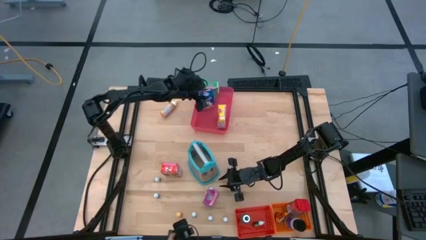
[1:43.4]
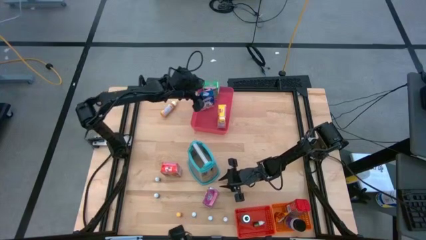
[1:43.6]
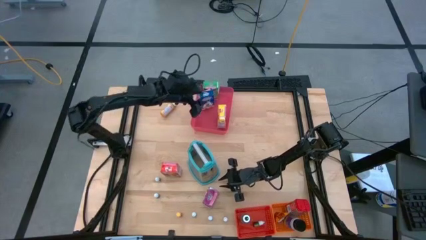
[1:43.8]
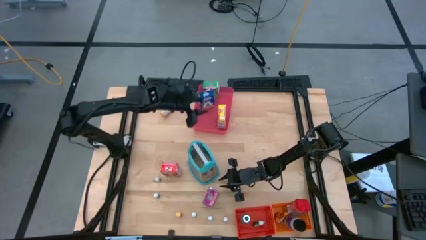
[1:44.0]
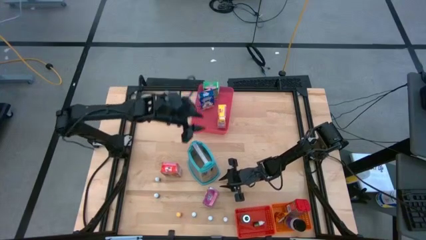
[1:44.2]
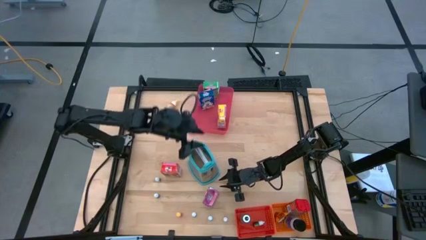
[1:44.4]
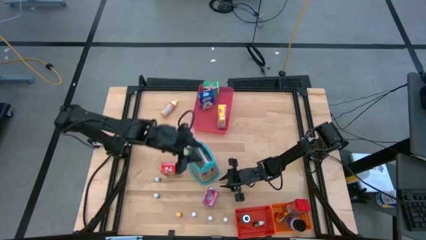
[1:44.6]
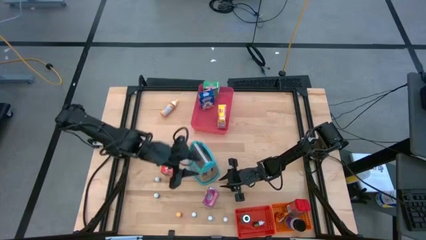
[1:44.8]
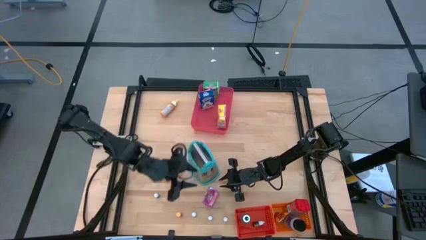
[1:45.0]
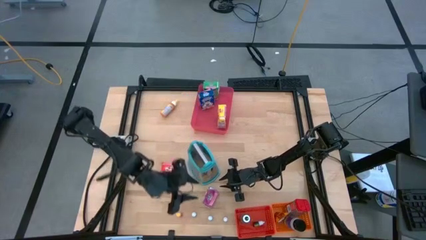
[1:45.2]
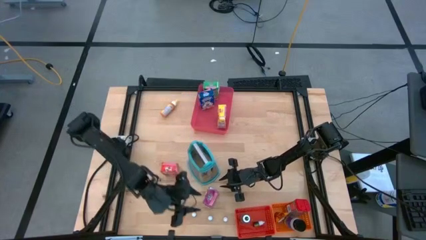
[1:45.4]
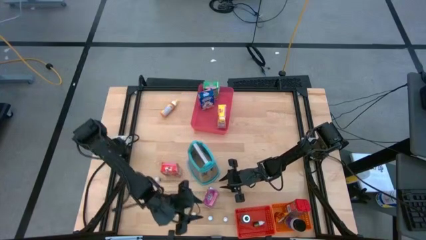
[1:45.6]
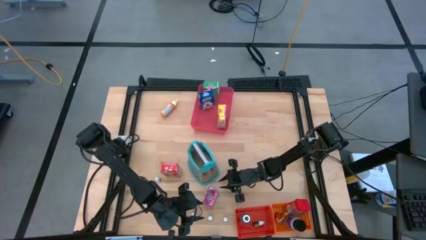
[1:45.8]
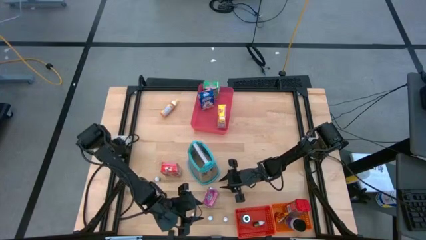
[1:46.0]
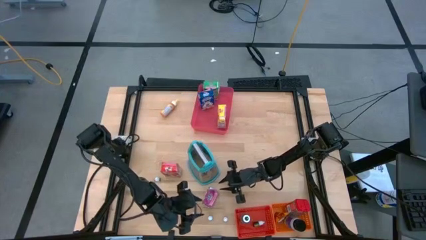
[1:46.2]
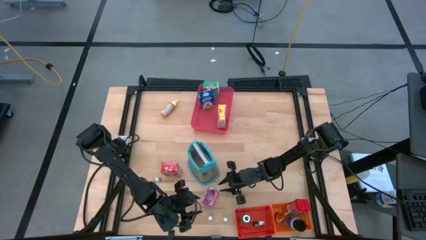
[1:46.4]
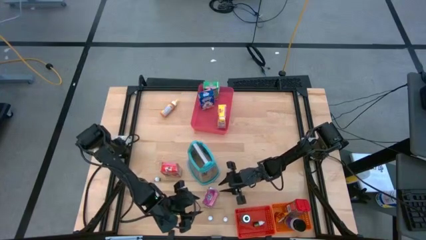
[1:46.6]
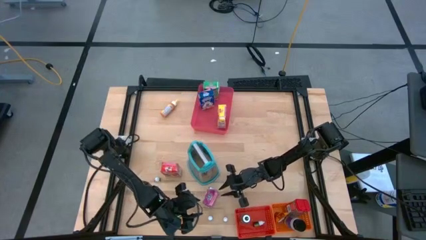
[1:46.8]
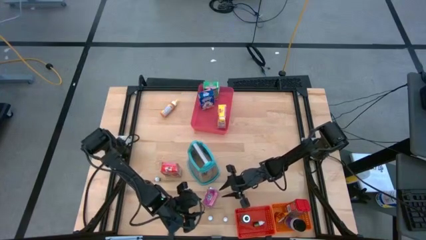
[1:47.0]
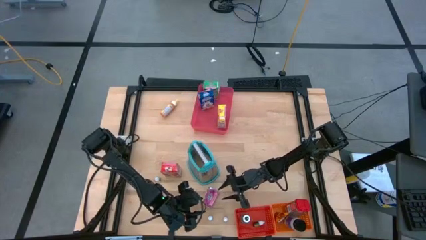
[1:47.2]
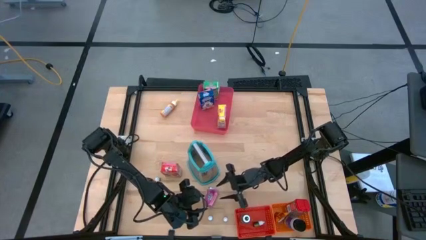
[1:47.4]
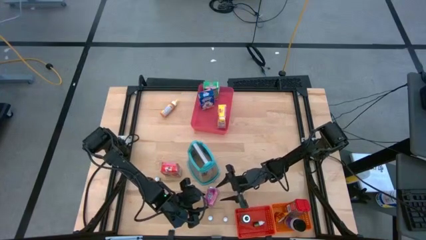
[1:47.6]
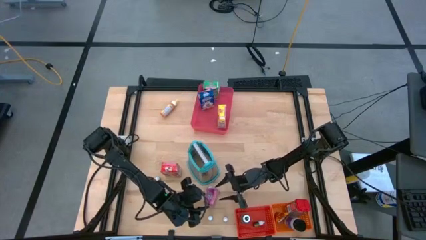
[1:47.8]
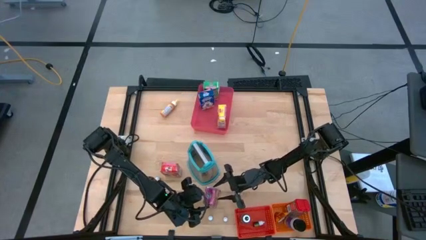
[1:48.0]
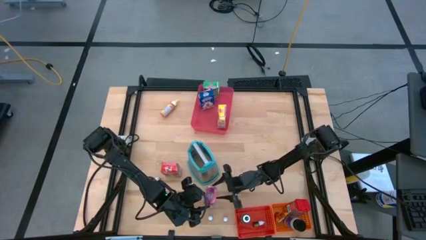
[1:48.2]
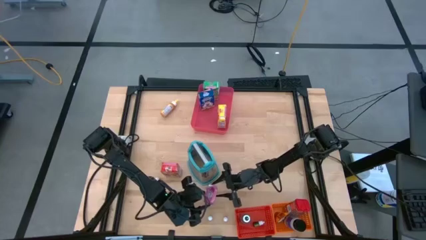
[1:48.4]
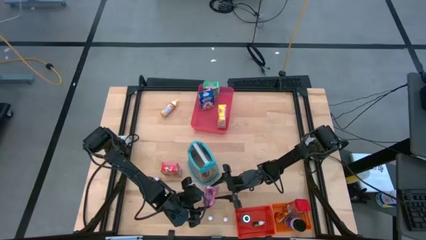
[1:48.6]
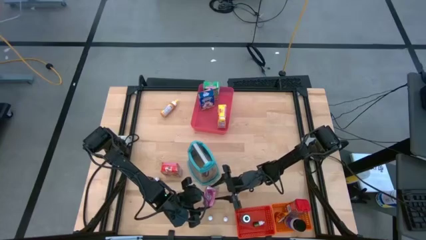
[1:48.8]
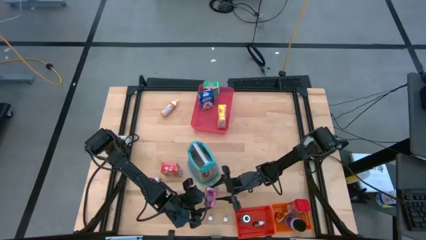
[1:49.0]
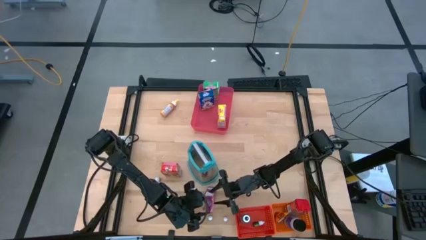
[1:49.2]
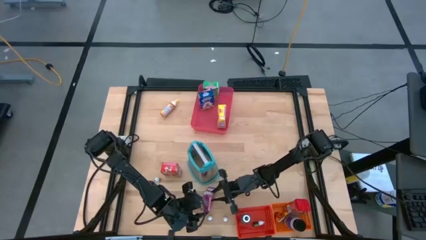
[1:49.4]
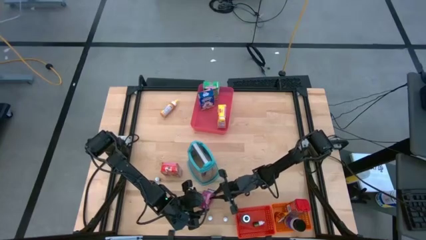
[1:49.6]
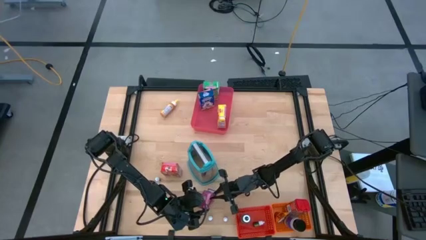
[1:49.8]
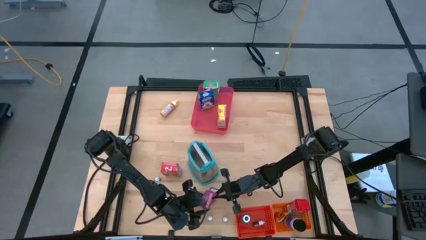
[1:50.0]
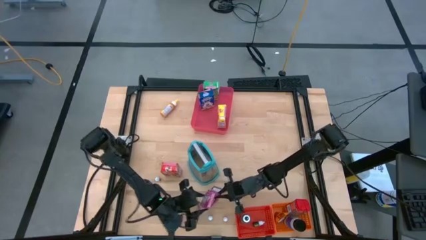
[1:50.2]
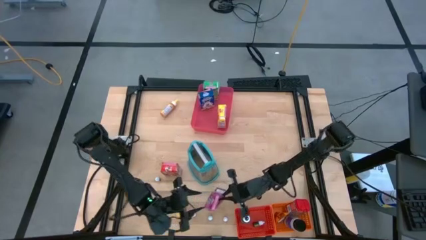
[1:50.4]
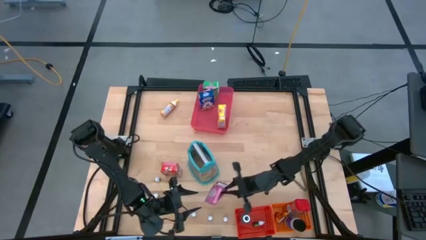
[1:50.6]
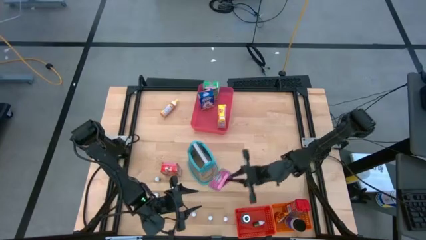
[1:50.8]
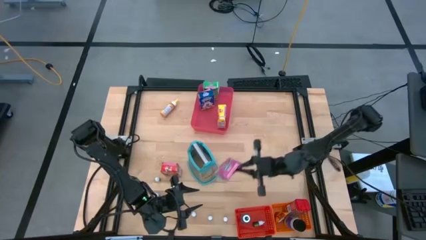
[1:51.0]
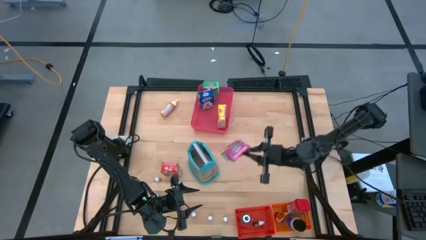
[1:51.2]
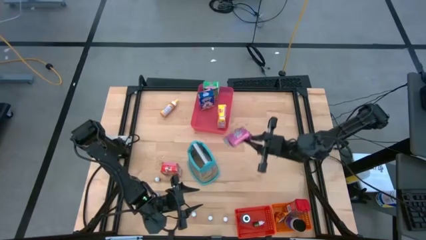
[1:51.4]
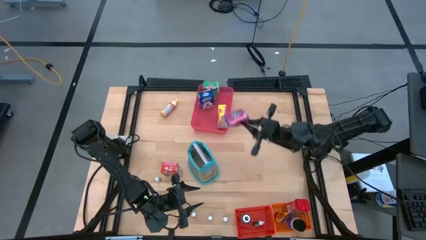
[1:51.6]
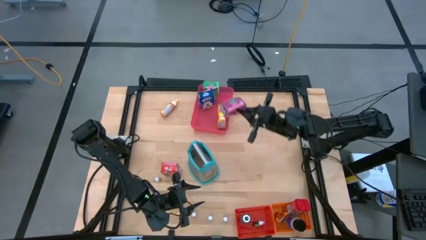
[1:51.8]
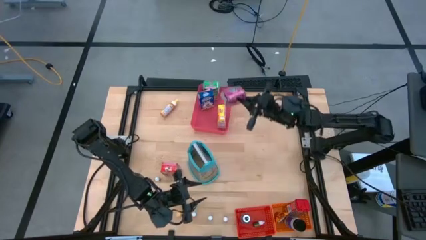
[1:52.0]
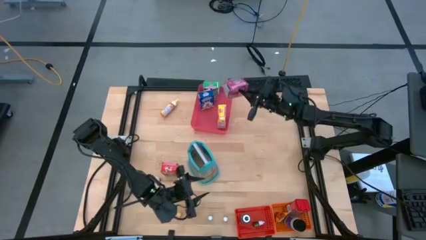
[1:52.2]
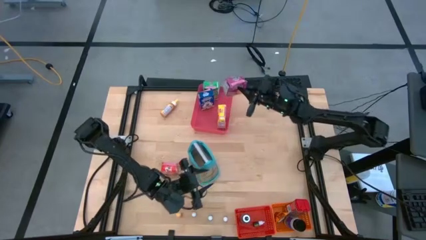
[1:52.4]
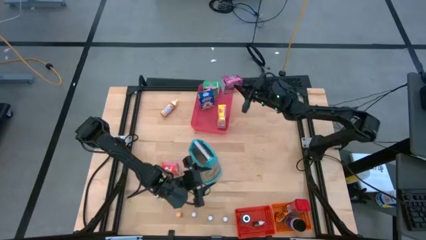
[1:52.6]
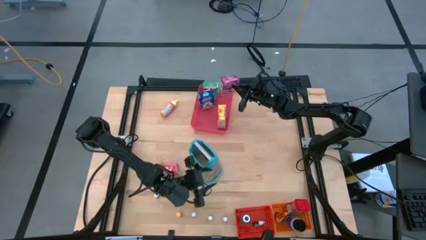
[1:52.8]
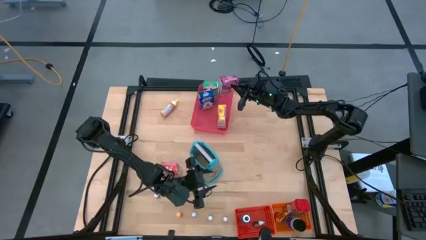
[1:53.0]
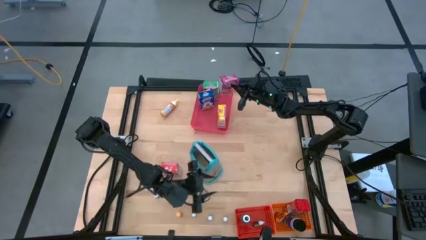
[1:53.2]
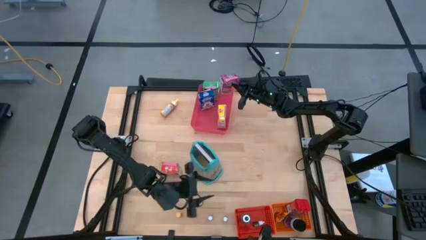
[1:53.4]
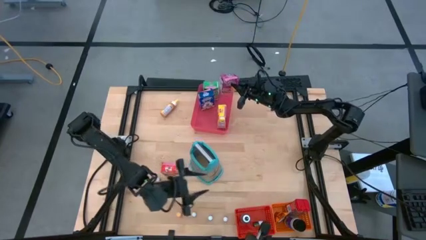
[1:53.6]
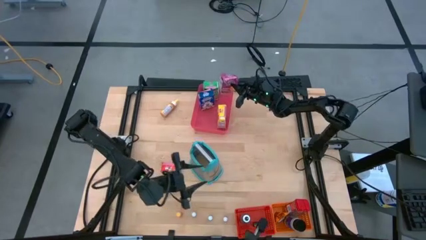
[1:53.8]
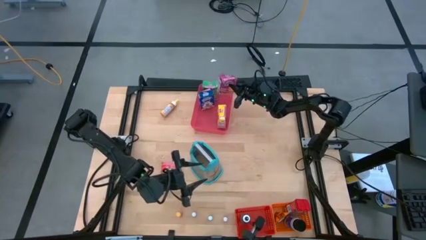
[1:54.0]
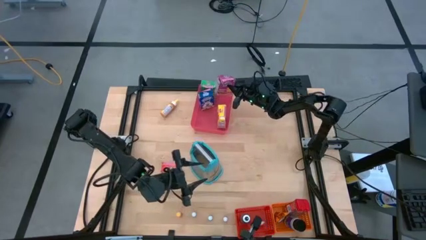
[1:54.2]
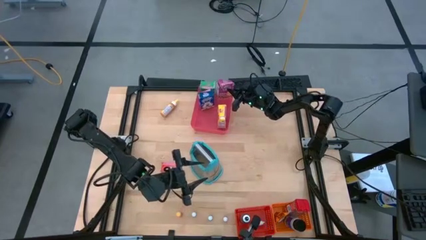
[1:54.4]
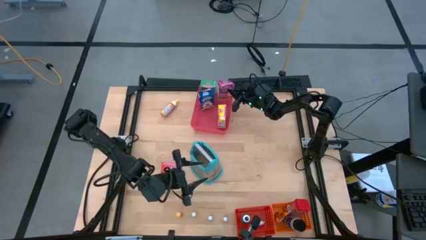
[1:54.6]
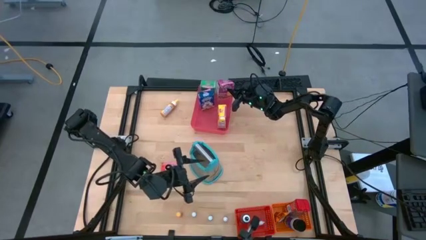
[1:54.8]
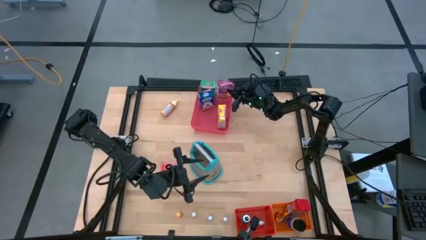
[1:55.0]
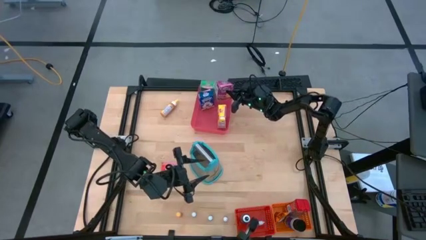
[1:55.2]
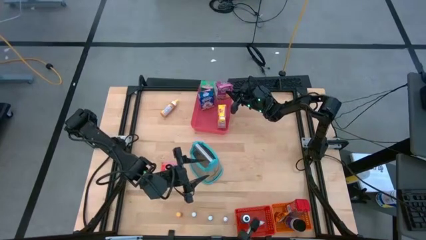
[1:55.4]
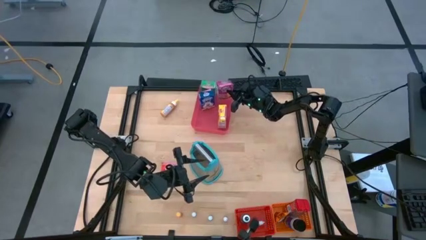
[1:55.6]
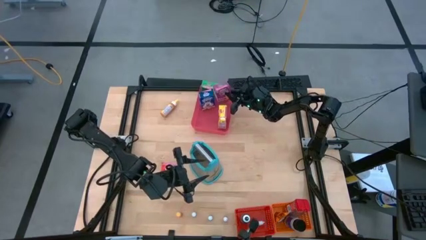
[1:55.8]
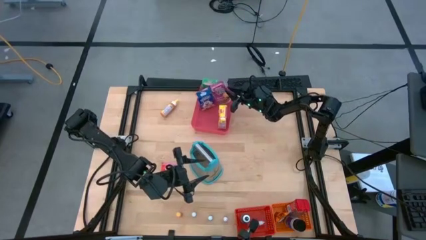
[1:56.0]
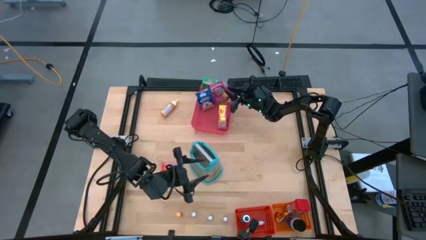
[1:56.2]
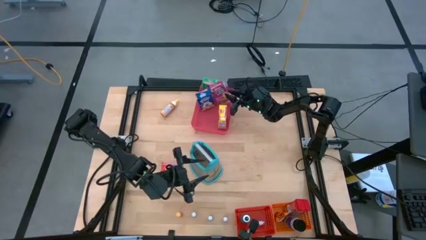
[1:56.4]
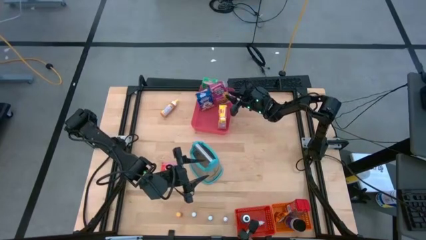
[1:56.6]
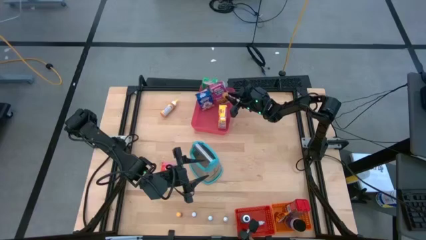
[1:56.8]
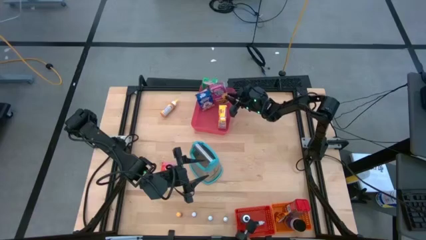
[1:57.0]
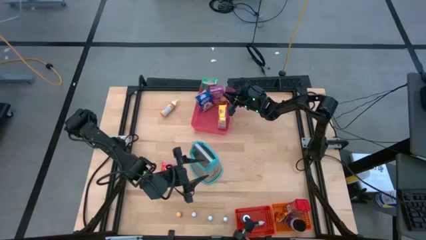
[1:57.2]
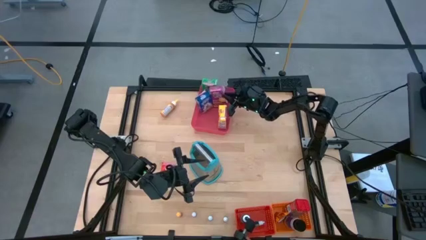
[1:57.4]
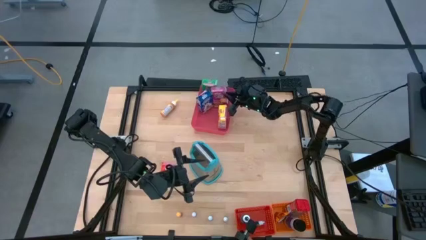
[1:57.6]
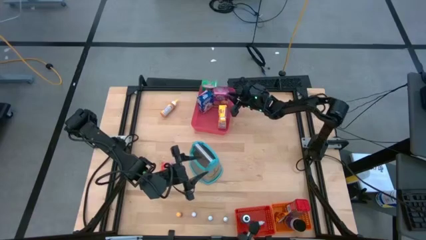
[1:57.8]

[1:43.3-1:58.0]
Task: Pick & Place Kitchen Items
Put the pink cereal box into the pink bin
